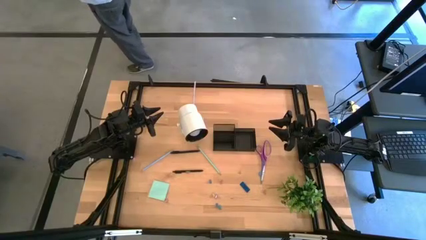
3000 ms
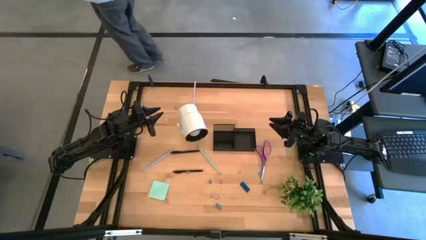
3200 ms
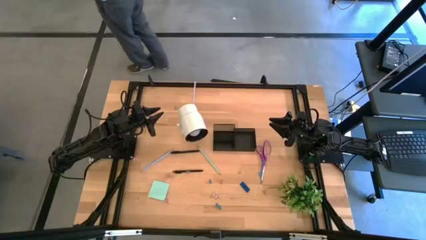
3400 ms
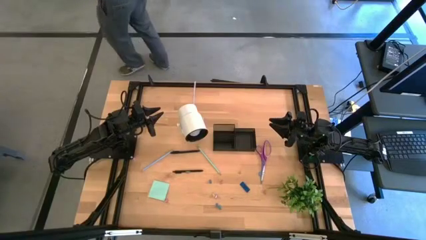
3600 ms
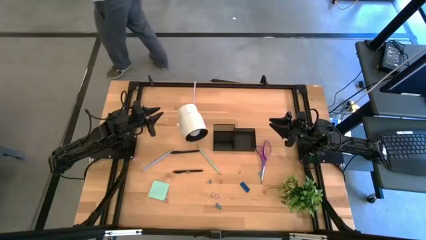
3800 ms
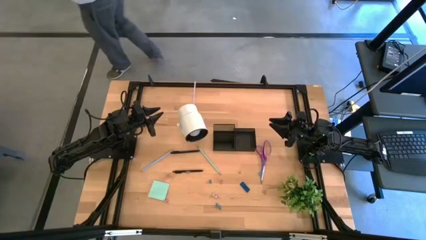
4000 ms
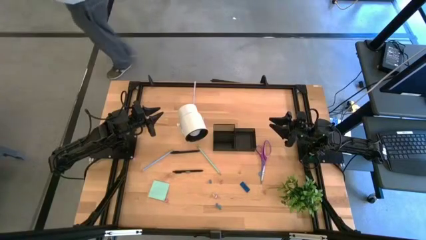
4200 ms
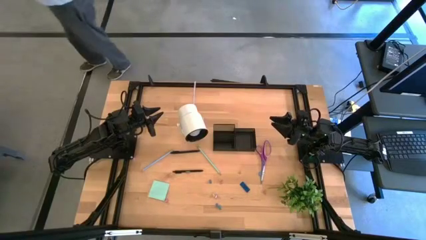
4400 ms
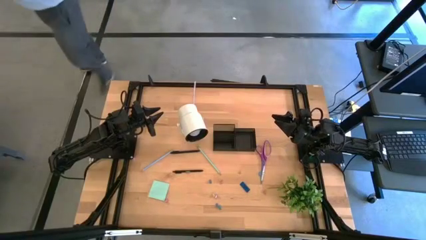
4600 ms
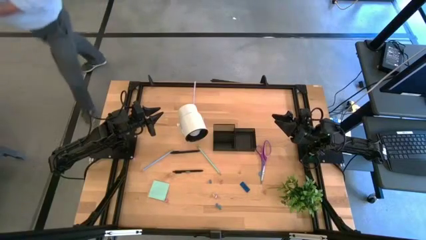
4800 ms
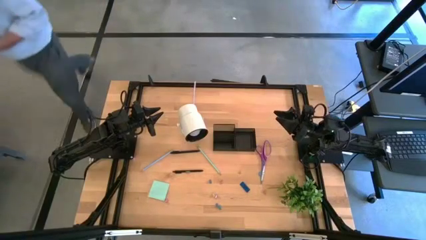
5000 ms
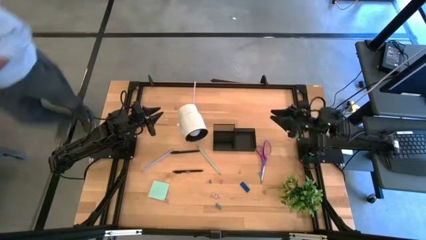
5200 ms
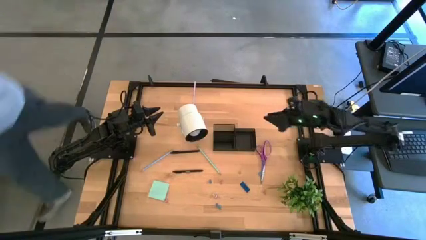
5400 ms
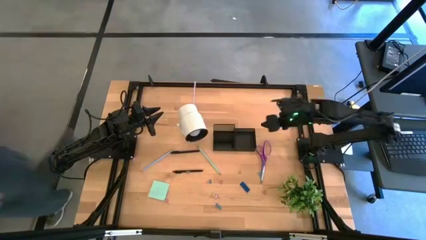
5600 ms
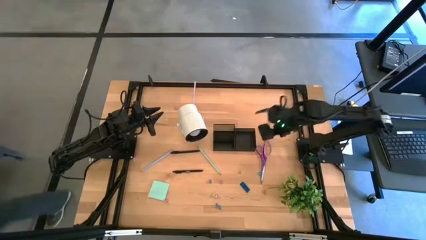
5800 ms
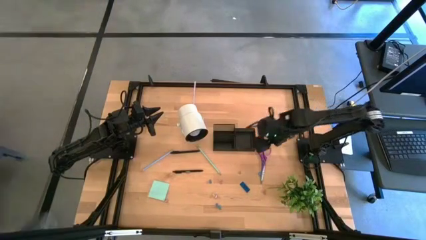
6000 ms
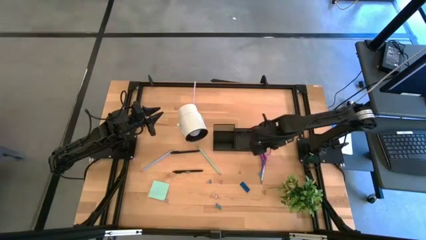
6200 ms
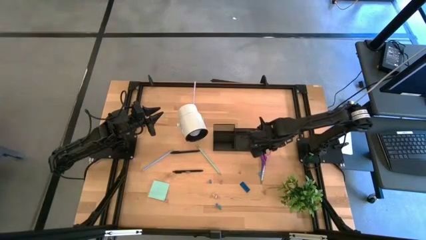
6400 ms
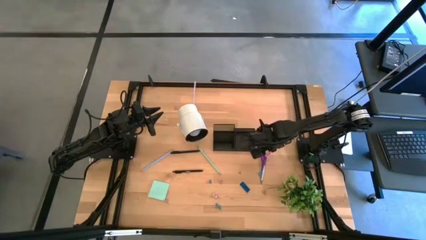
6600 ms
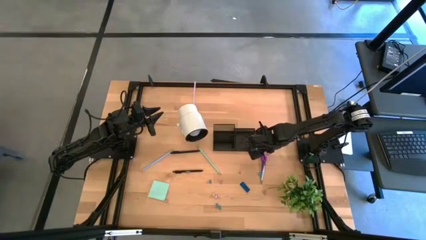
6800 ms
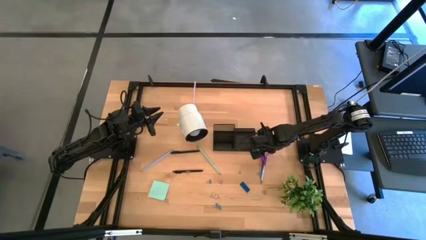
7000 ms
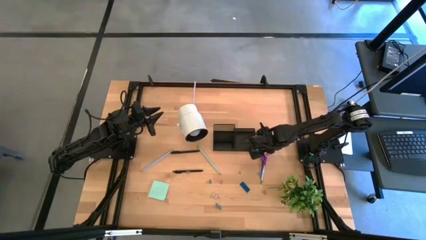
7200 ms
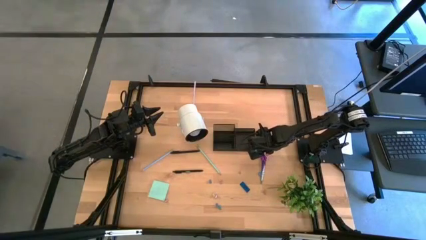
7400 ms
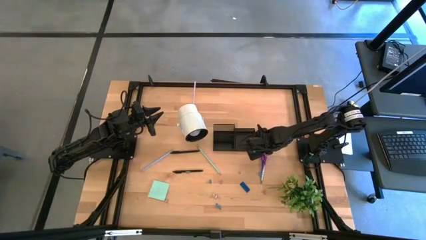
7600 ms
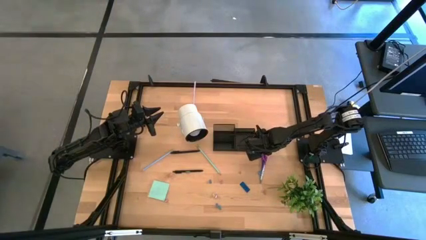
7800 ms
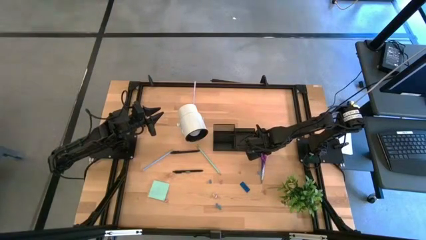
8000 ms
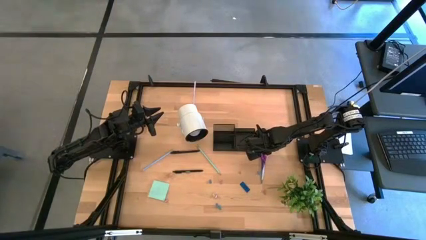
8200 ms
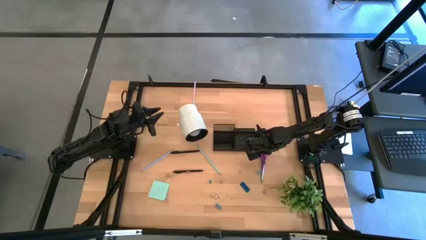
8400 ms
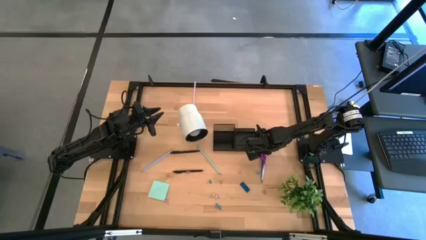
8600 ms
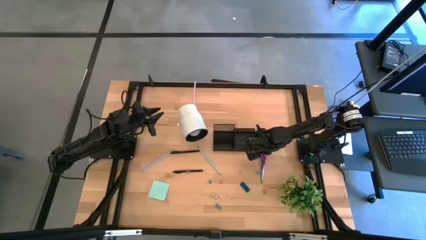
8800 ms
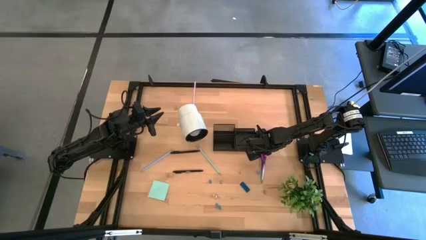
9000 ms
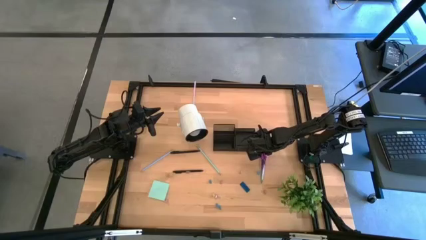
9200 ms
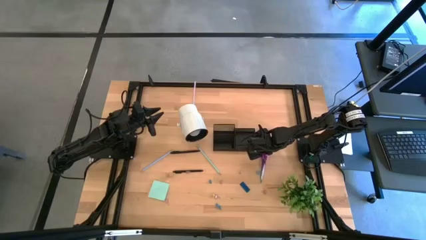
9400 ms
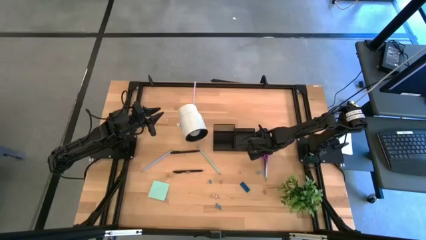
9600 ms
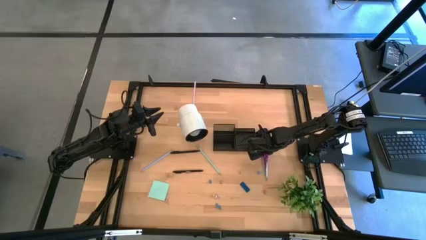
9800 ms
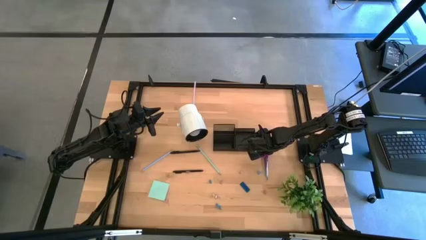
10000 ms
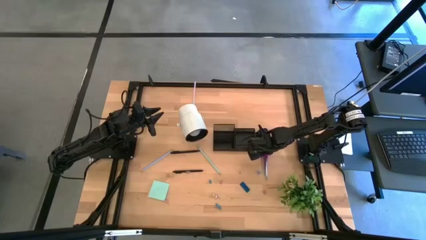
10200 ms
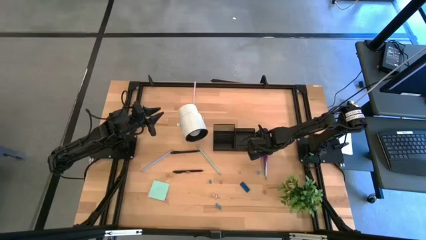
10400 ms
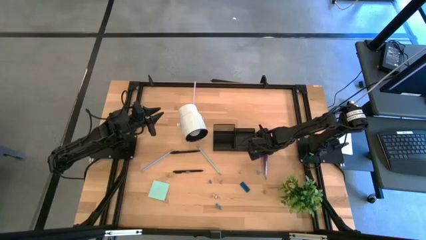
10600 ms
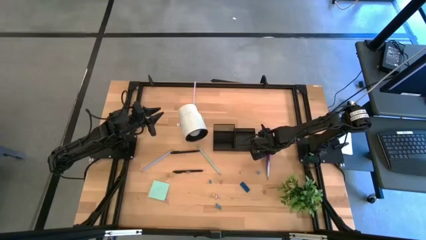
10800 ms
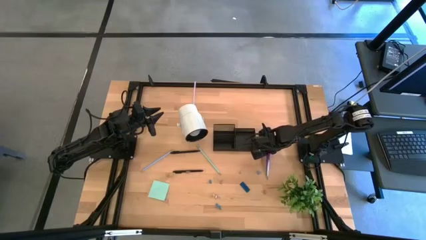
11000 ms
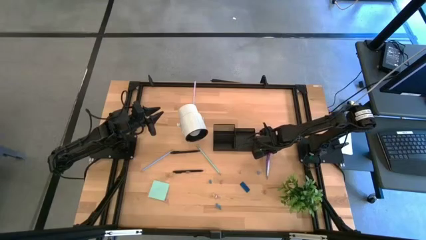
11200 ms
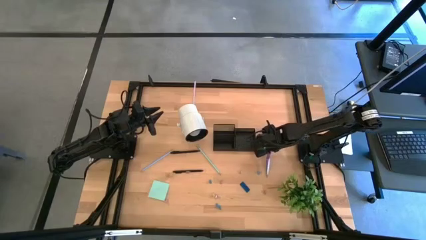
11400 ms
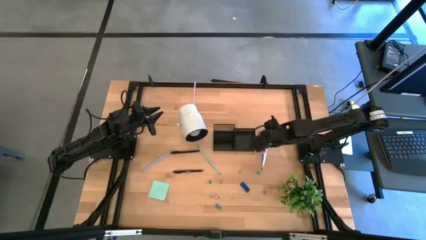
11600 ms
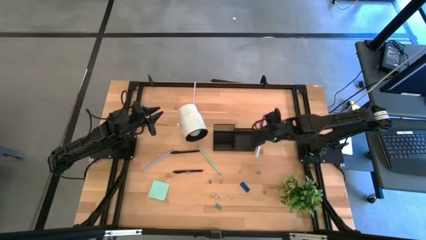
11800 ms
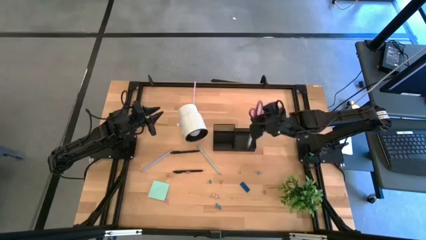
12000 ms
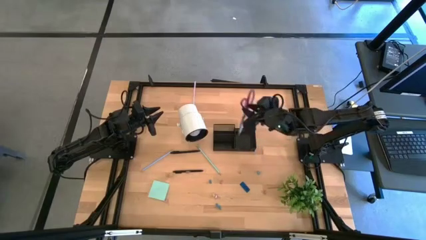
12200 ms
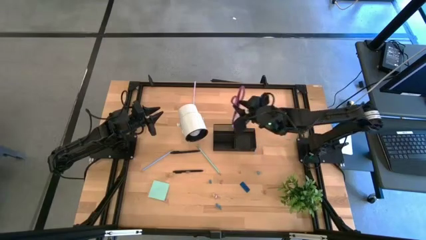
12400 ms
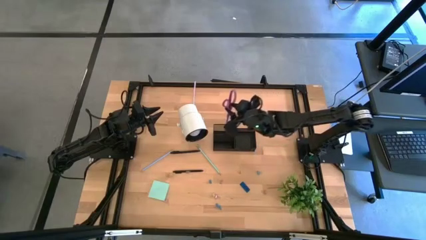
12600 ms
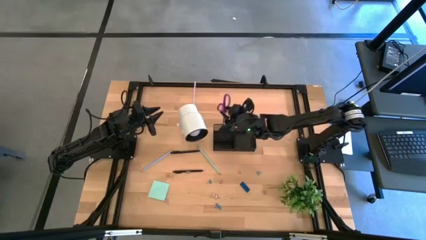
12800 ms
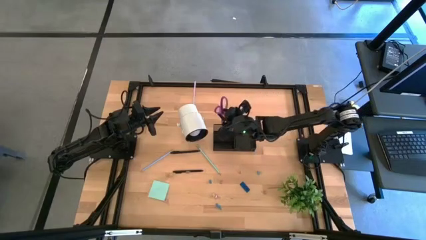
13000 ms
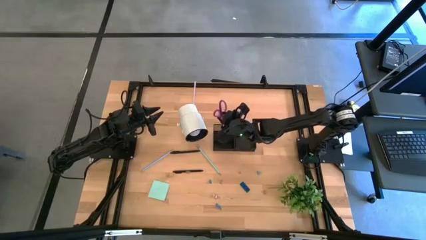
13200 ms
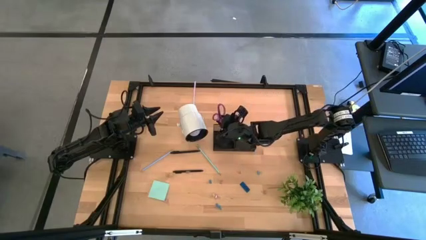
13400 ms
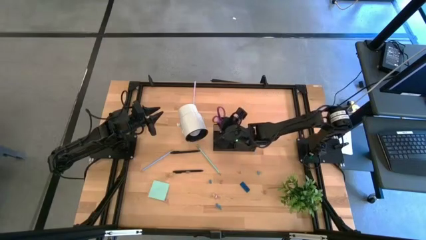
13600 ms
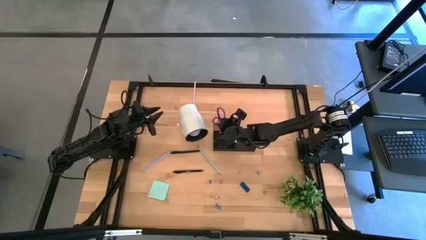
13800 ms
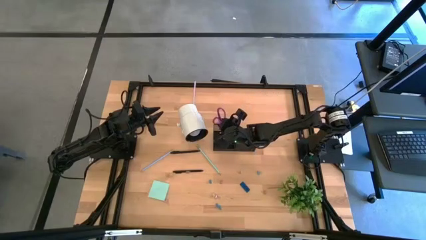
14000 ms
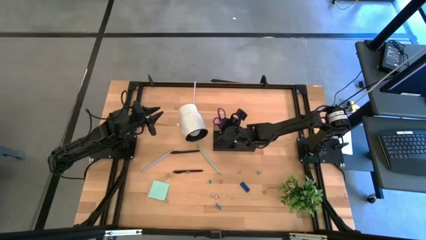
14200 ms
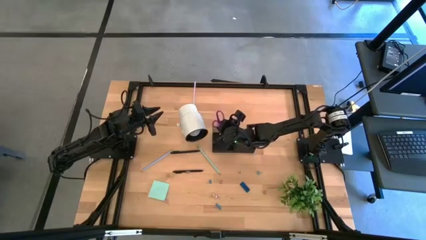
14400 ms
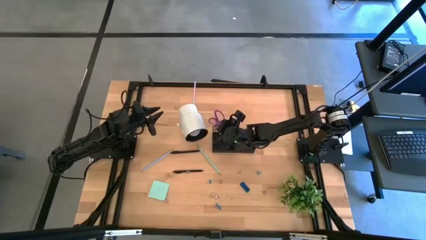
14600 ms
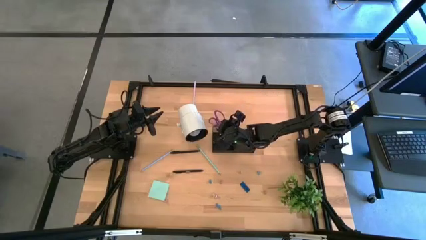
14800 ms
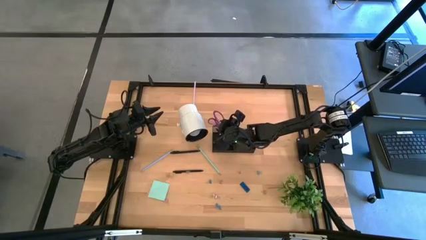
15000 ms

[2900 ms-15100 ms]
Task: Pick and place office supplies into organizer
Put the purple scissors into the black desk organizer
